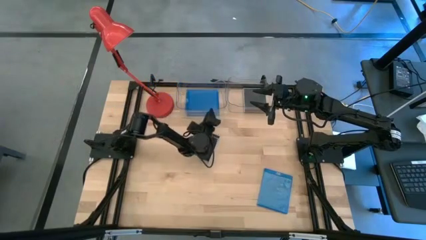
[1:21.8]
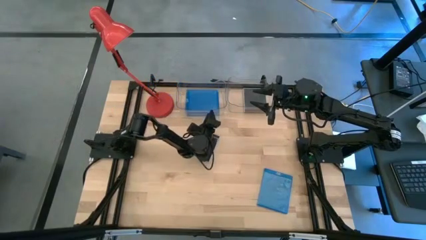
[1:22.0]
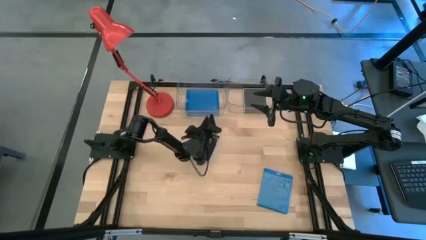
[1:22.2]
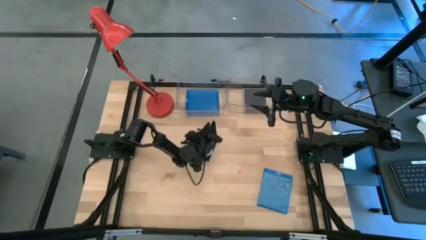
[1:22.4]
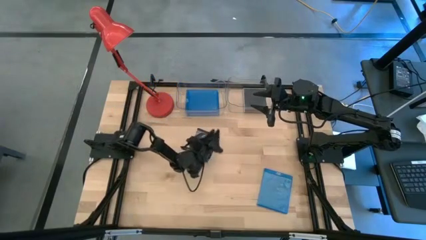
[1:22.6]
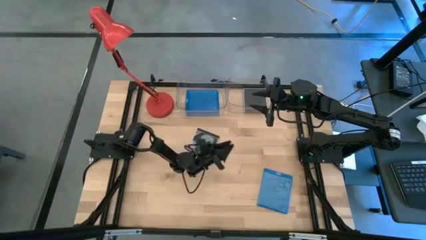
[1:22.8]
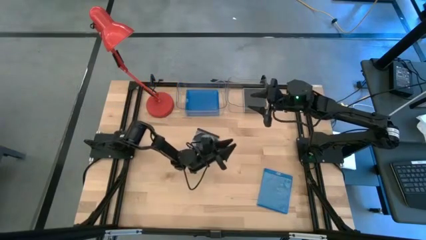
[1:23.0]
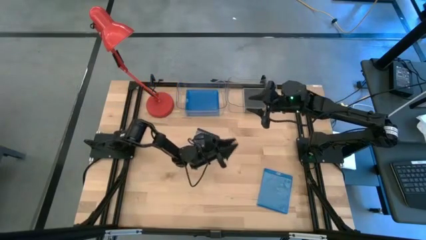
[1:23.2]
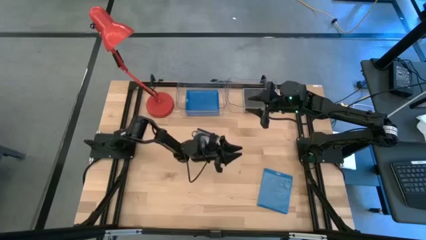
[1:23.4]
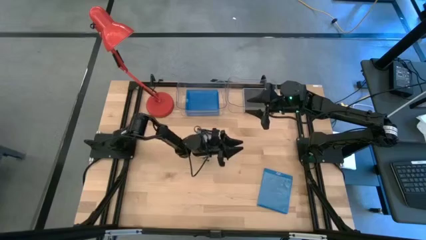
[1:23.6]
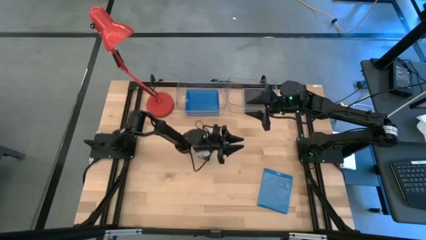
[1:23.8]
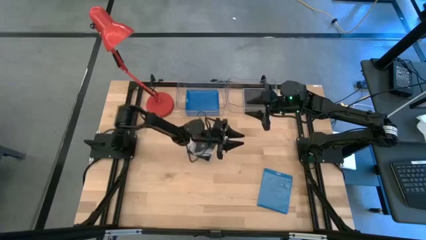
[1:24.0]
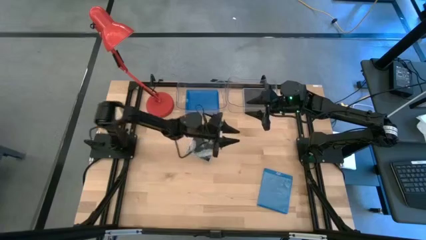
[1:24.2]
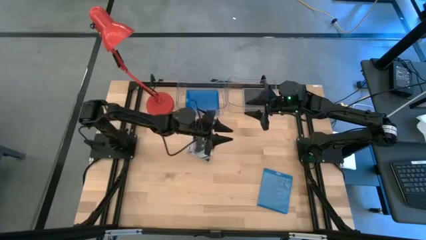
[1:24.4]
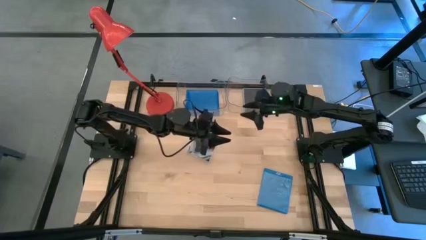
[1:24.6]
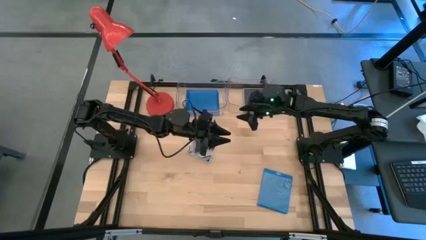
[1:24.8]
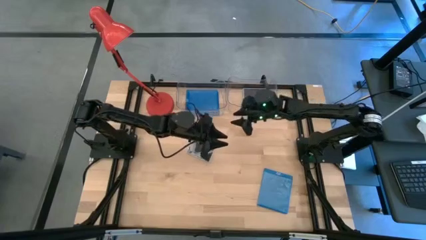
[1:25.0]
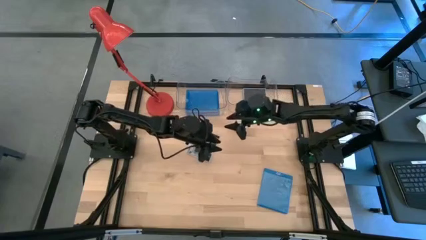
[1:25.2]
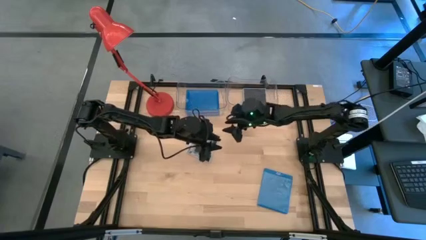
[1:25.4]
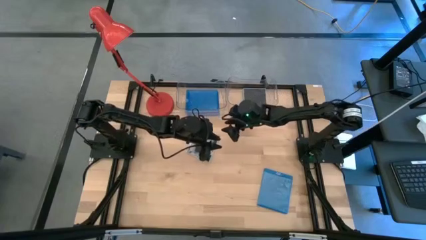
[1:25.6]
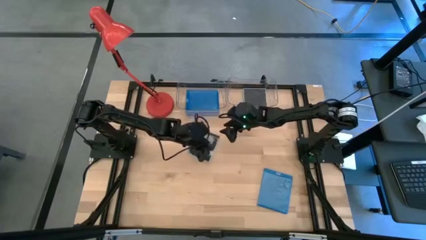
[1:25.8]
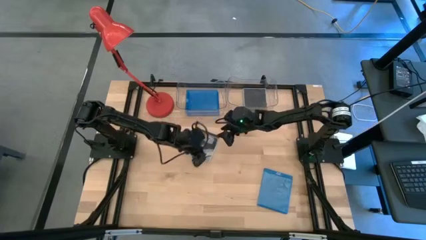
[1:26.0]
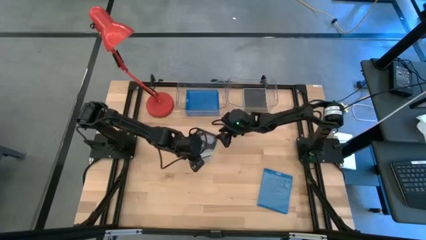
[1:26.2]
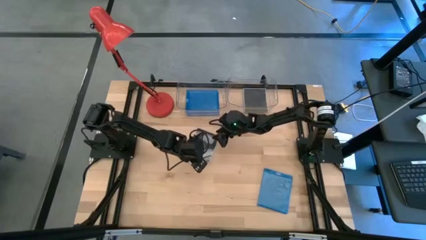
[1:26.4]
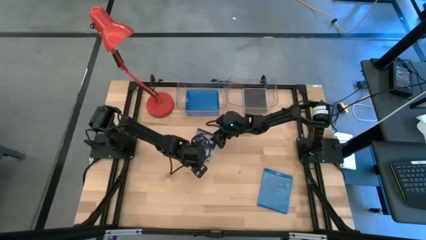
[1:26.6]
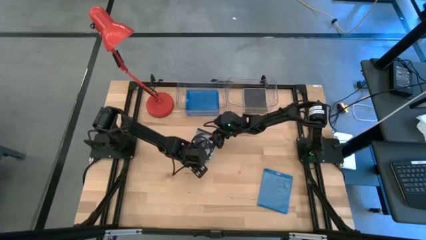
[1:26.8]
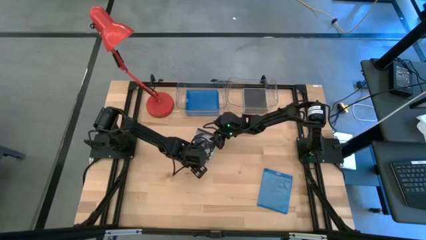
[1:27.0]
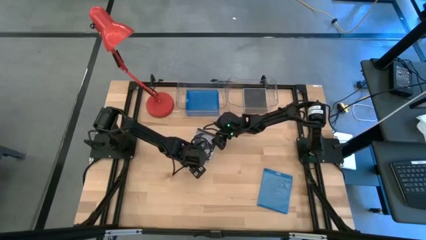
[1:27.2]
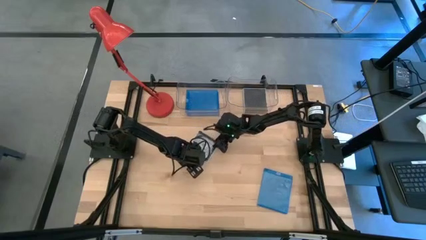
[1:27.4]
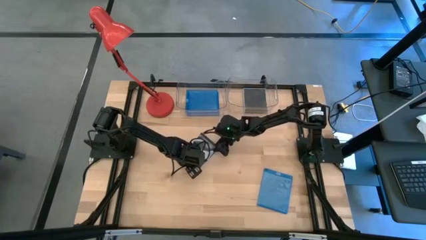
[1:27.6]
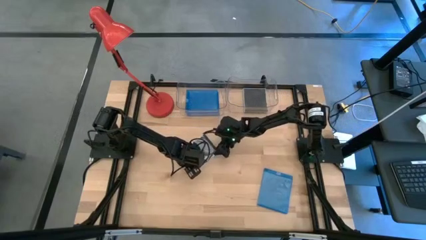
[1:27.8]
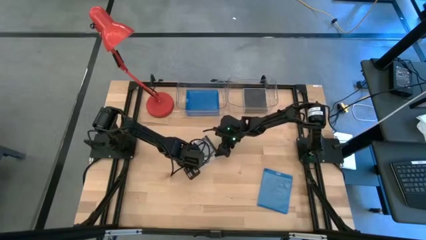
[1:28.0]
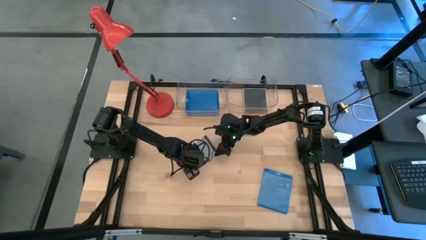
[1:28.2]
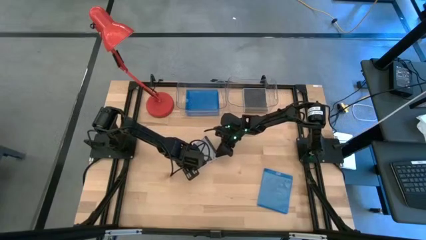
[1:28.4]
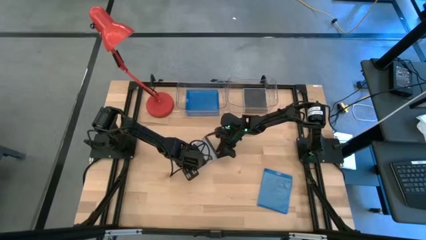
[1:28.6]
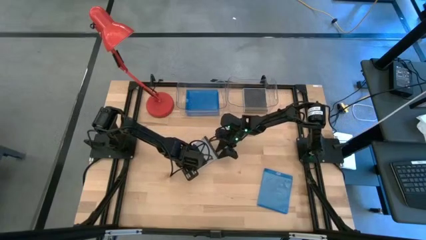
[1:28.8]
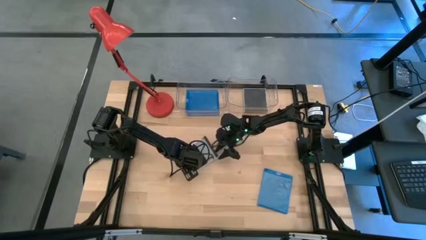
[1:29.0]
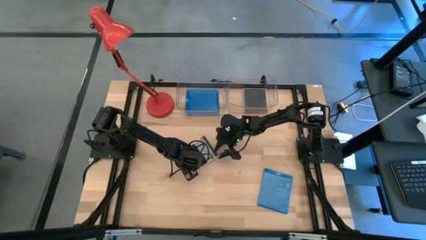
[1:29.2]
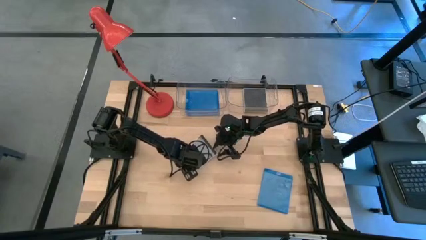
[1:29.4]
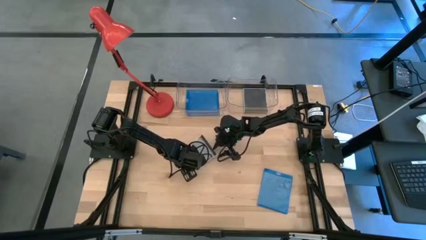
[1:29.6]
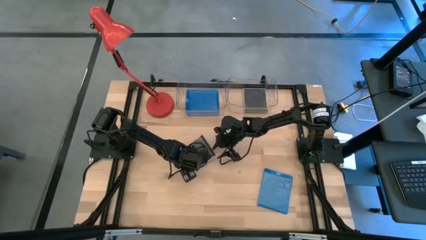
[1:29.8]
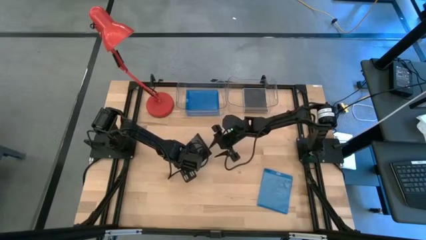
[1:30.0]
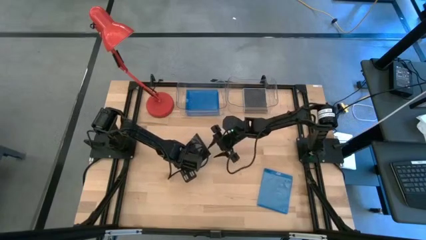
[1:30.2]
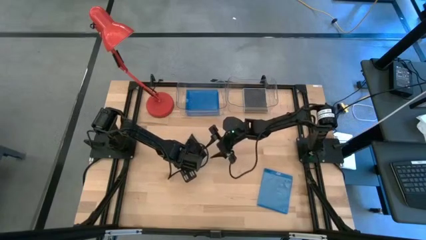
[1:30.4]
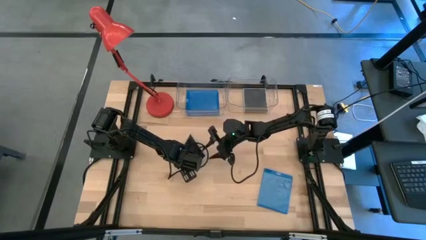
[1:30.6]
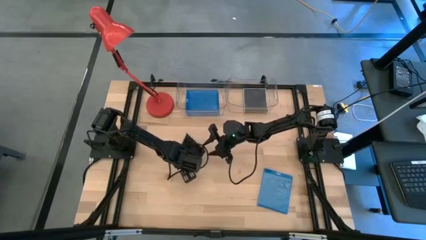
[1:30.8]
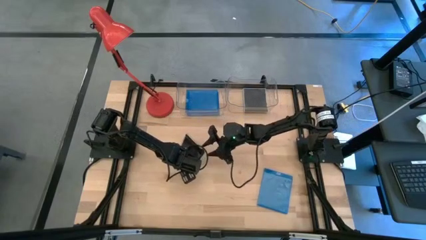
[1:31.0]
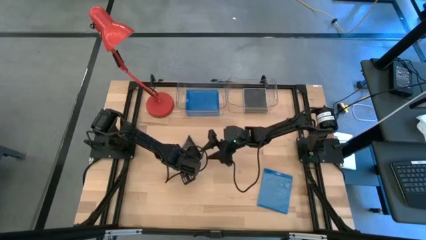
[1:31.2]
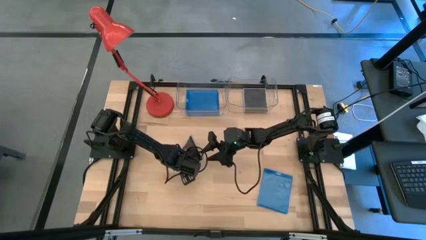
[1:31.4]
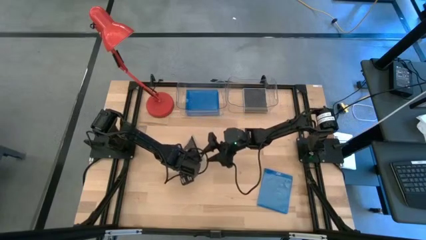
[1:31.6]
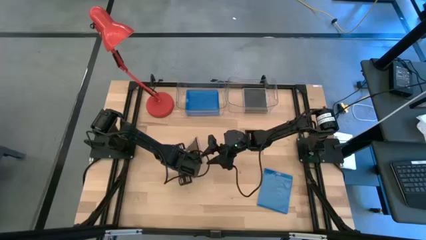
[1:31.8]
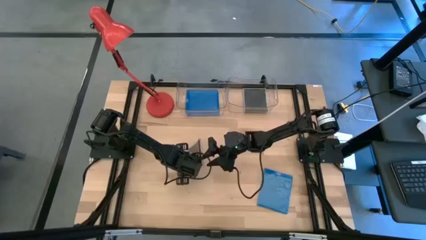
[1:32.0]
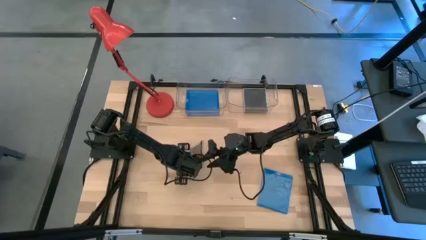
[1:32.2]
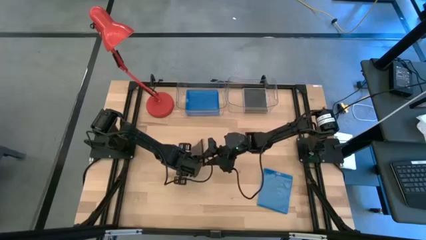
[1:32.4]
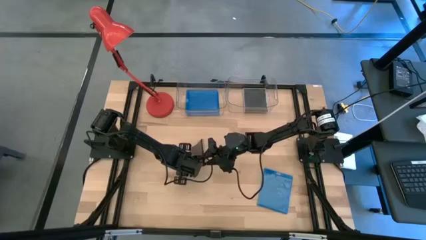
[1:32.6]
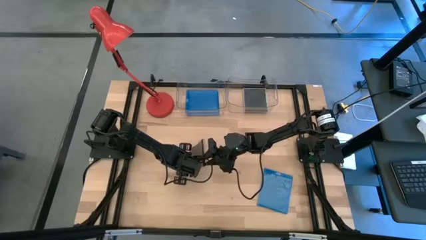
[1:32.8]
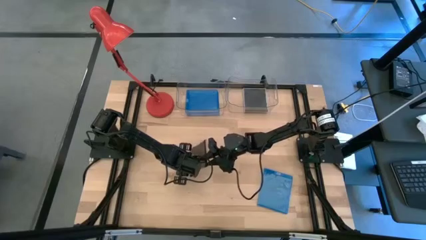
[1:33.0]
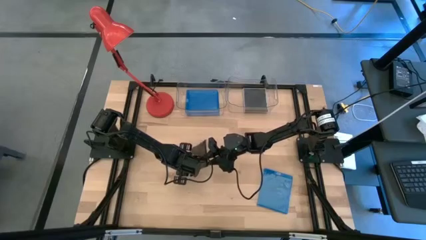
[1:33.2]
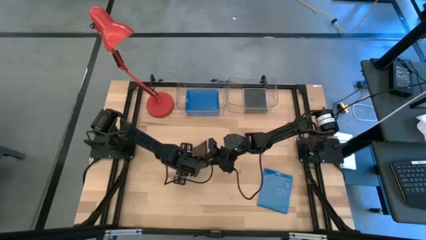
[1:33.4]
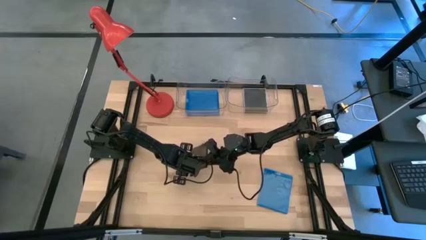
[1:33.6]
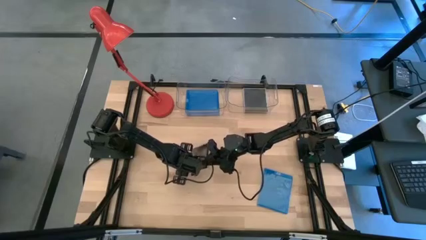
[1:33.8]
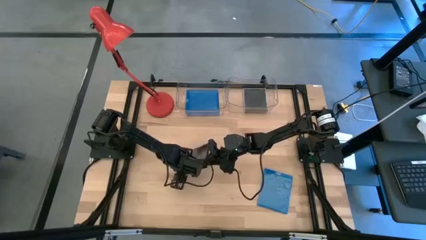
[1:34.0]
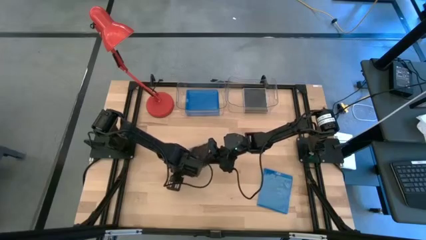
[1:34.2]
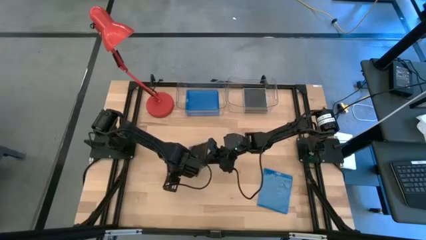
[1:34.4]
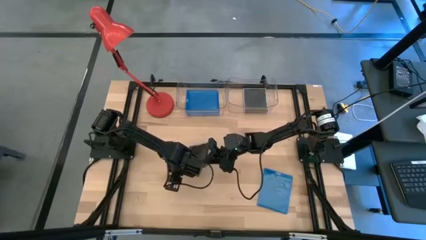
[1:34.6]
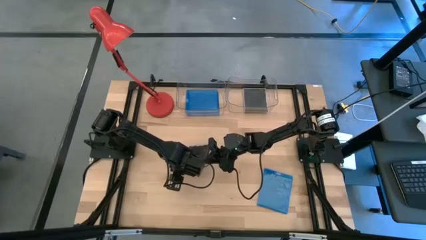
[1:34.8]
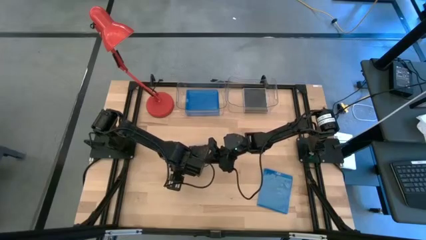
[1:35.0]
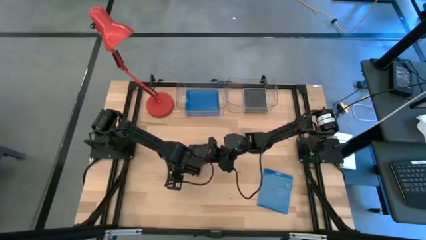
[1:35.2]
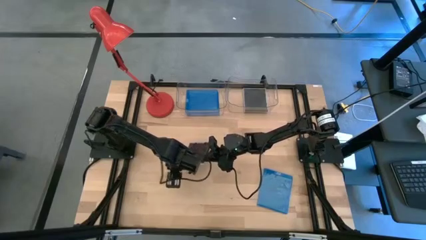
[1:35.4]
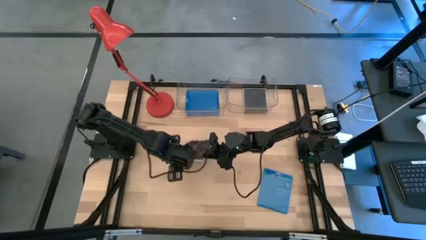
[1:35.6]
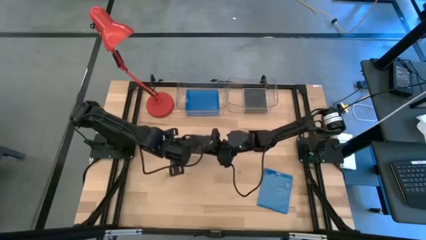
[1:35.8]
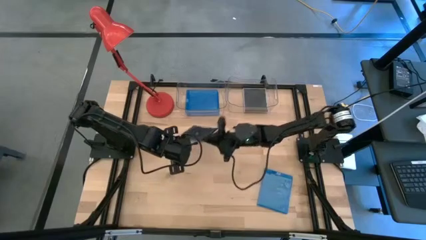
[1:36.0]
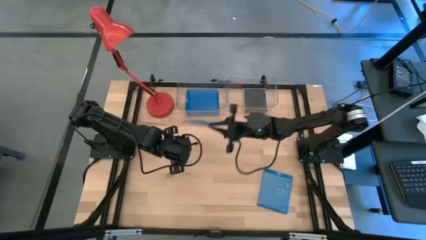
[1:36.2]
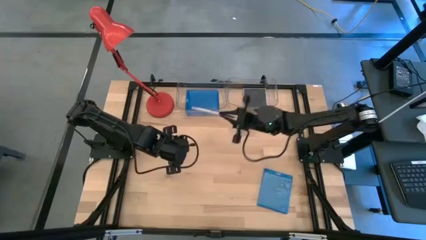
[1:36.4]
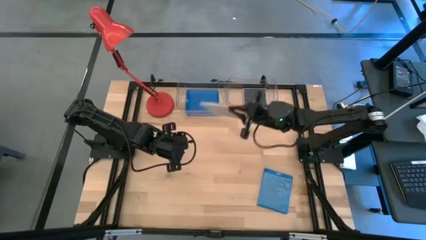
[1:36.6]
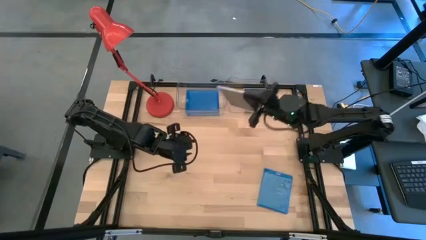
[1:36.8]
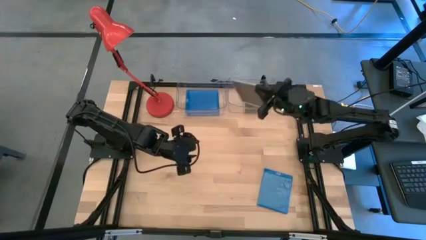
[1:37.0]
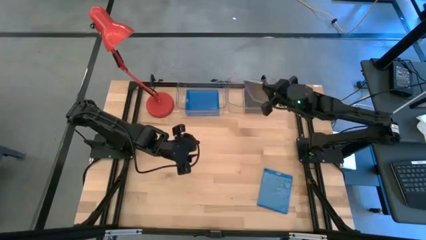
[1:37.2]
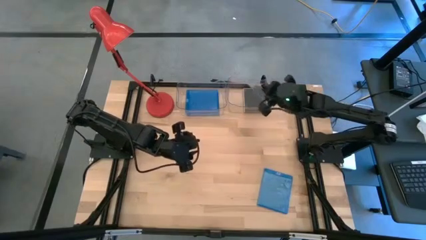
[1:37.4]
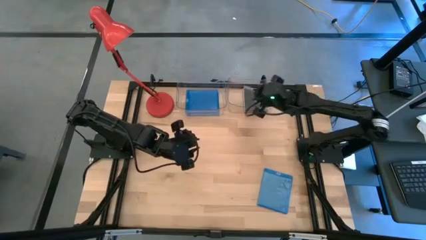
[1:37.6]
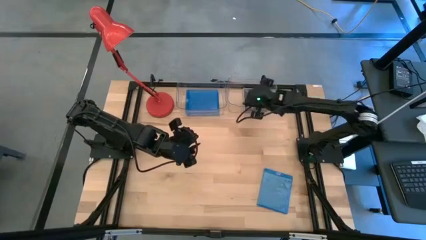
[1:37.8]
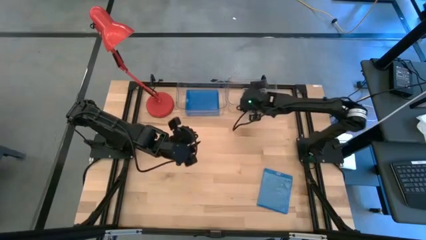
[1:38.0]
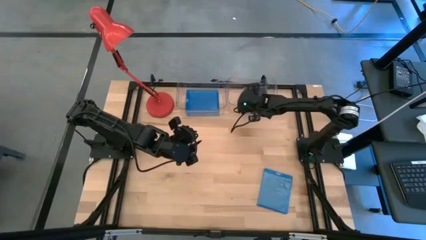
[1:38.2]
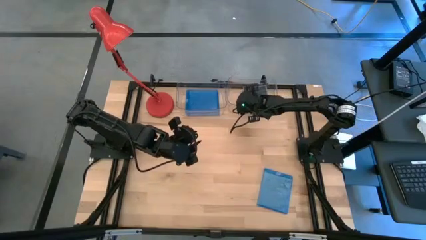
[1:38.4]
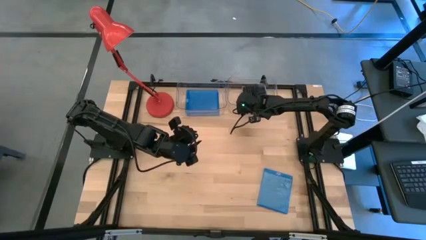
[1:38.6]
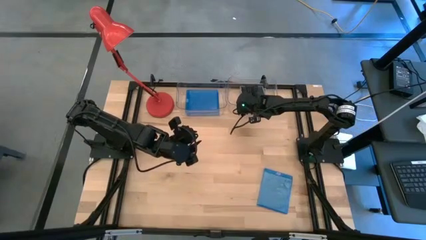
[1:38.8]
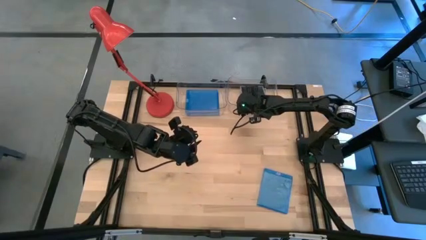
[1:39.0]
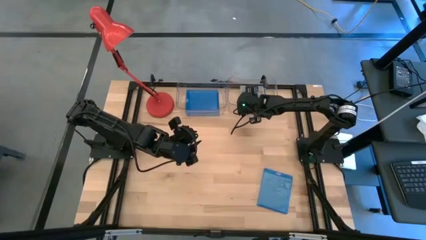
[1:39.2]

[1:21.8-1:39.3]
Task: Pick & place jewel cases by type
Put the black cd case into the right transparent bin

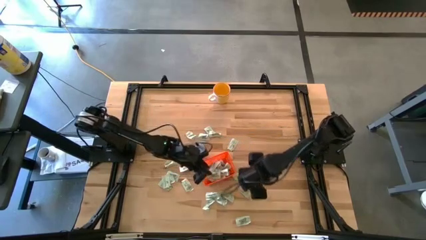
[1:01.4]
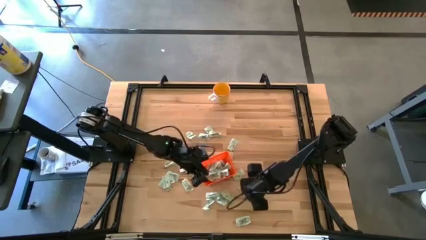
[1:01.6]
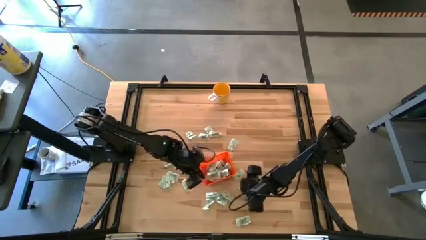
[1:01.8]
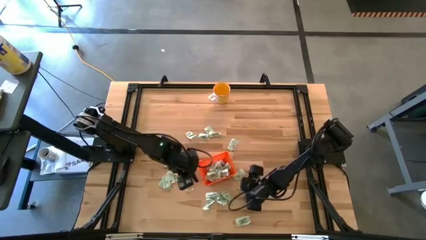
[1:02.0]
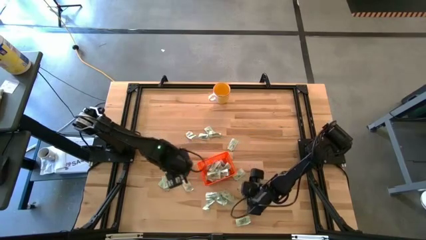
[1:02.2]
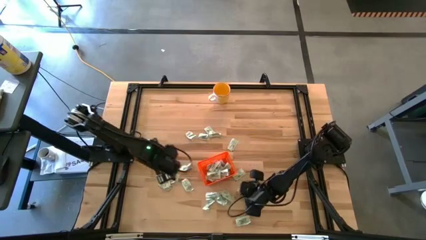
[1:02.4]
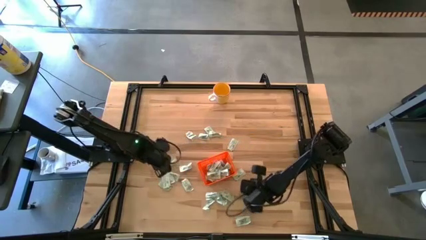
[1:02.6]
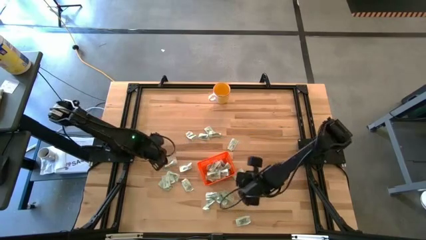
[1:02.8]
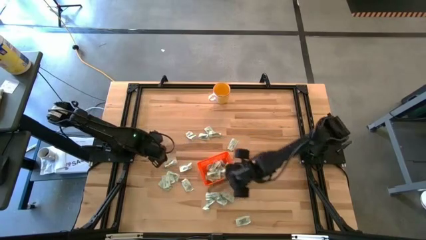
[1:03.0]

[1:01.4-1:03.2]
Task: Pick and place Stevia / Truvia into bins
Put the stevia packet into the bin
